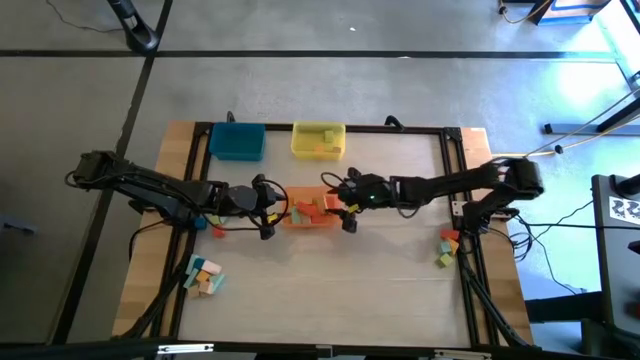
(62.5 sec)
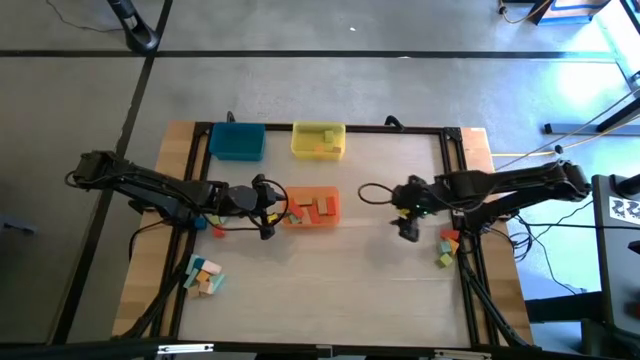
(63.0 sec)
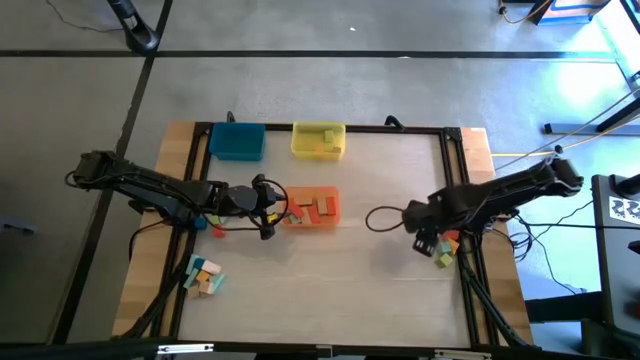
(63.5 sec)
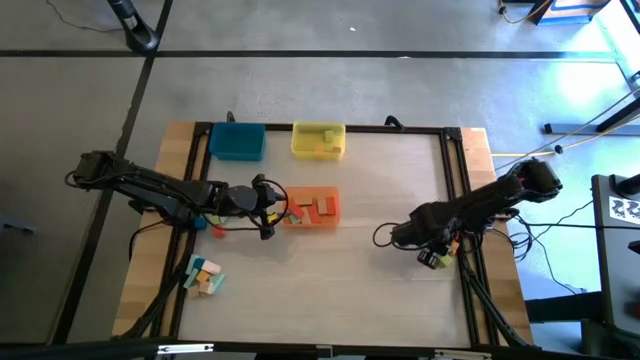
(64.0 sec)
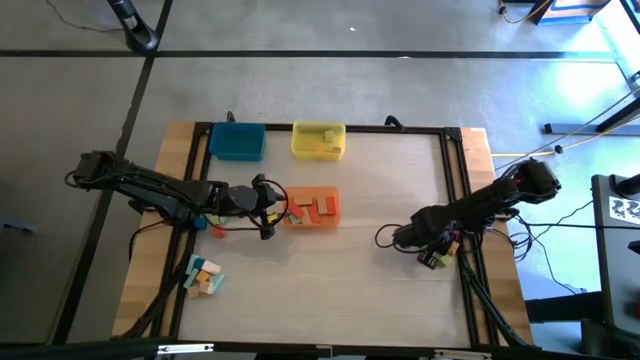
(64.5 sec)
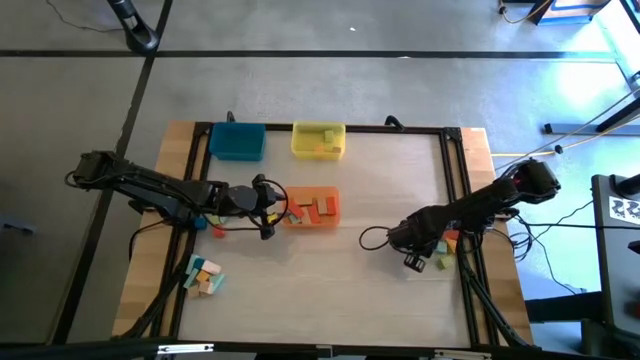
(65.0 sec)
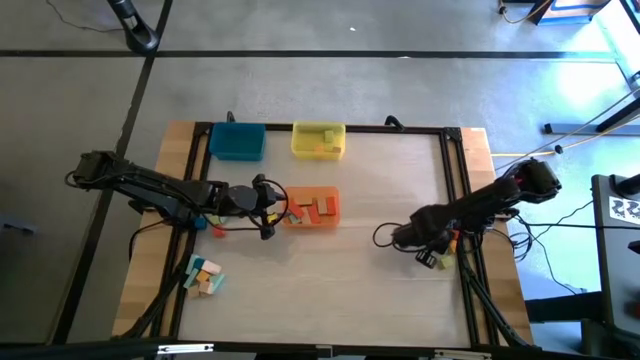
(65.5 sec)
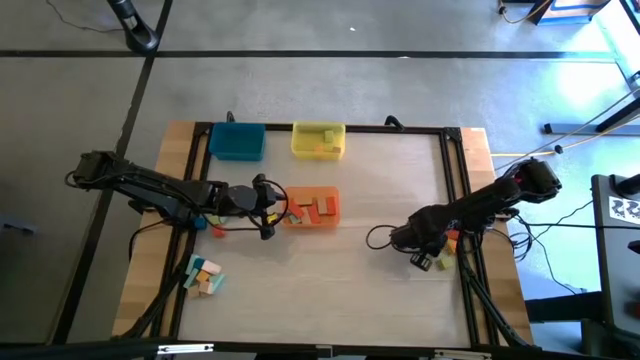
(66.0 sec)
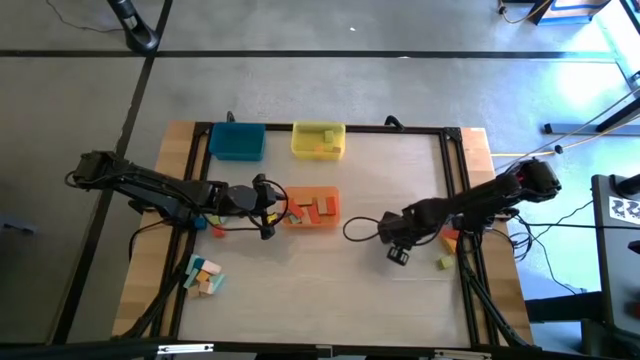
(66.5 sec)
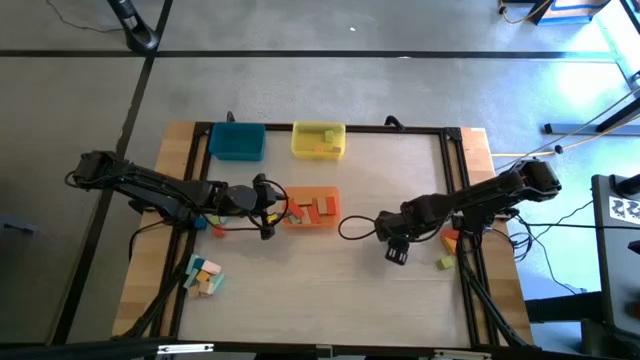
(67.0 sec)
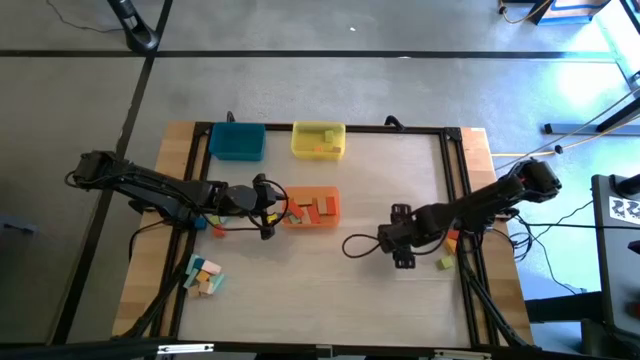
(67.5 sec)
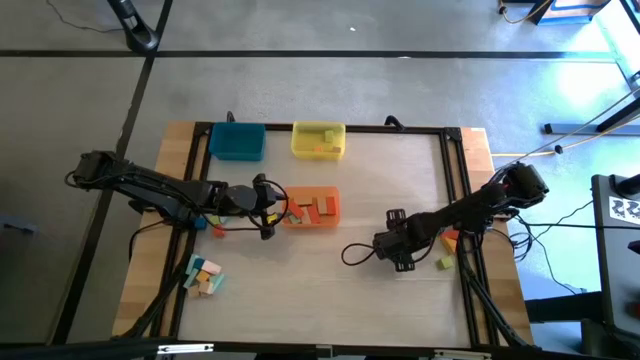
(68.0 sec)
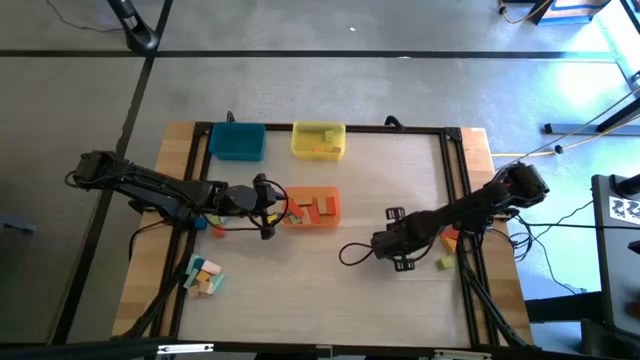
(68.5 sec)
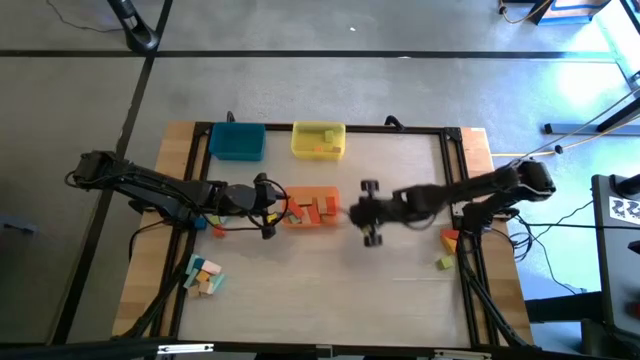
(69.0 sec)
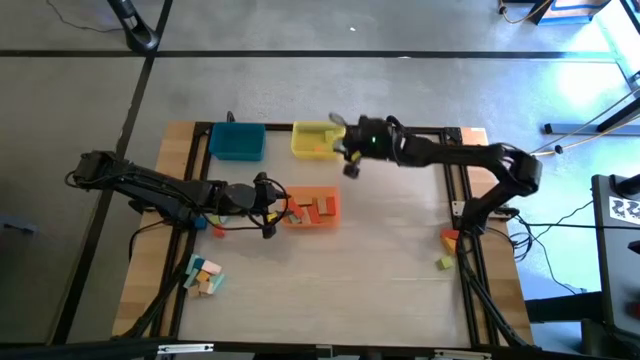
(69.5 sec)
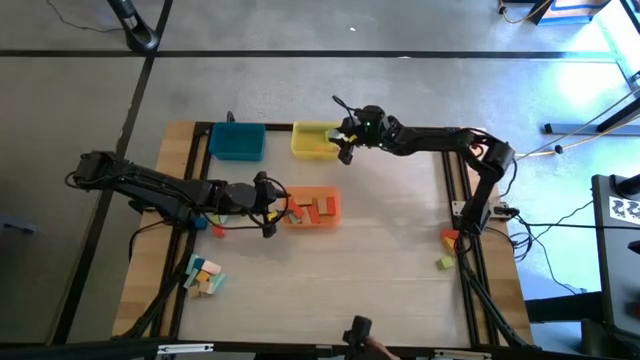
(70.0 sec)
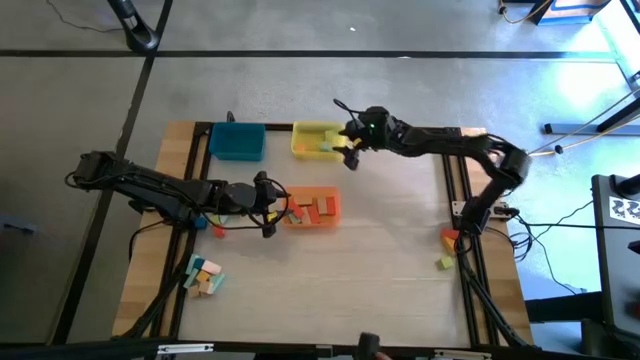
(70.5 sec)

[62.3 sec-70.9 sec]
Task: Sort blocks by size
Put the light blue square block into the yellow bin

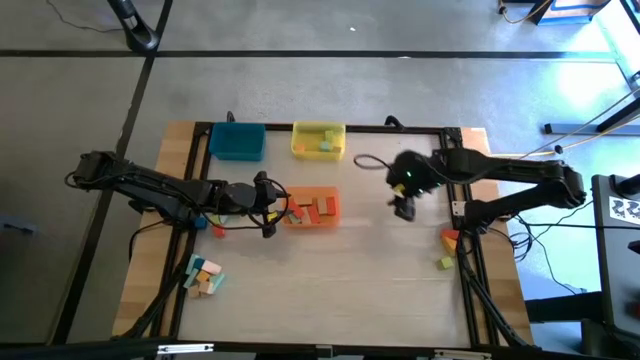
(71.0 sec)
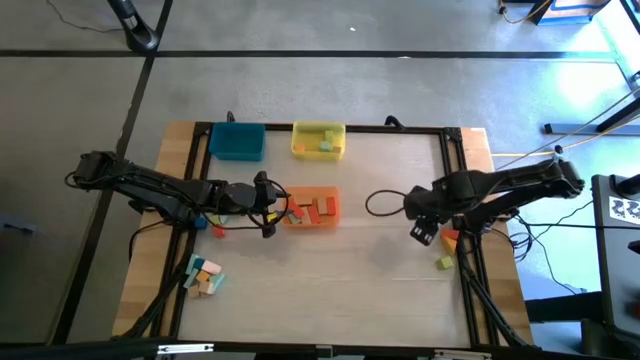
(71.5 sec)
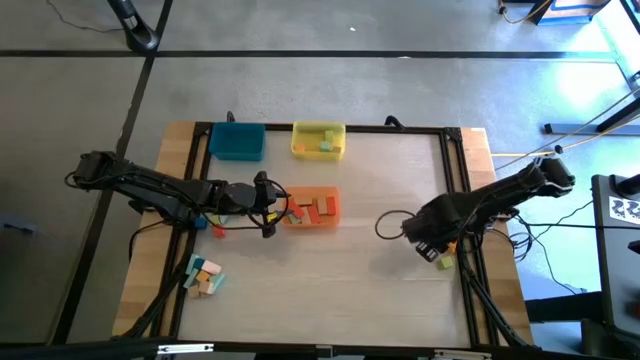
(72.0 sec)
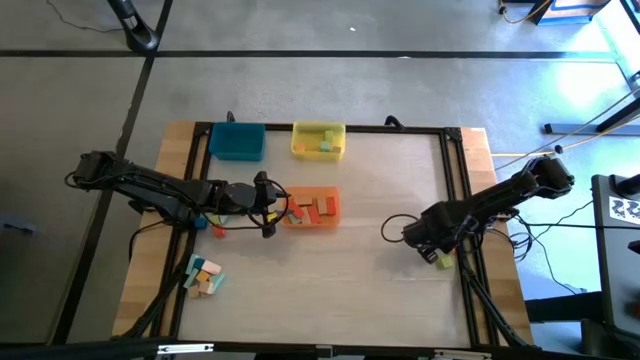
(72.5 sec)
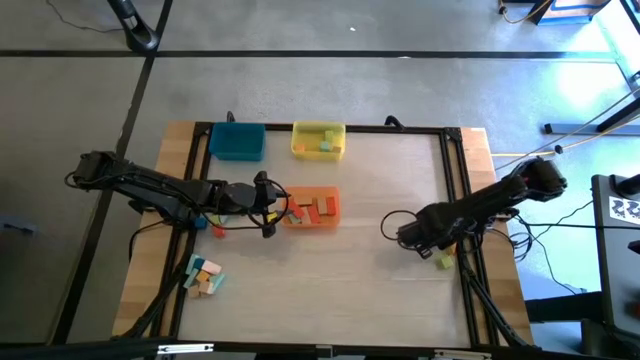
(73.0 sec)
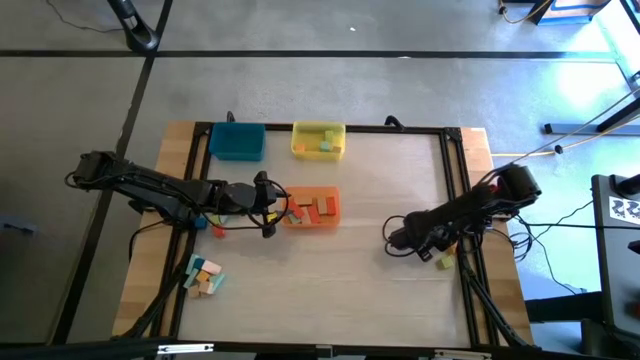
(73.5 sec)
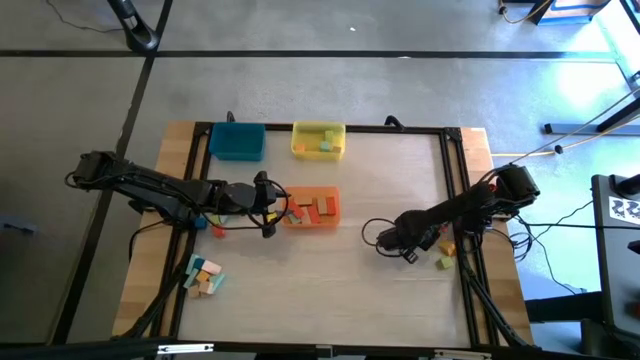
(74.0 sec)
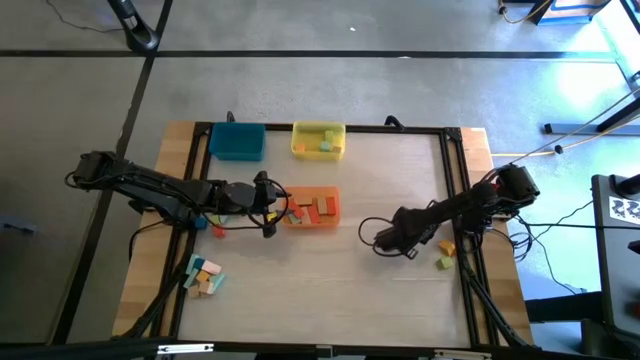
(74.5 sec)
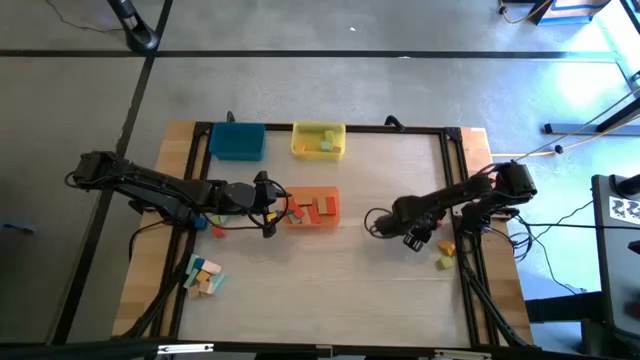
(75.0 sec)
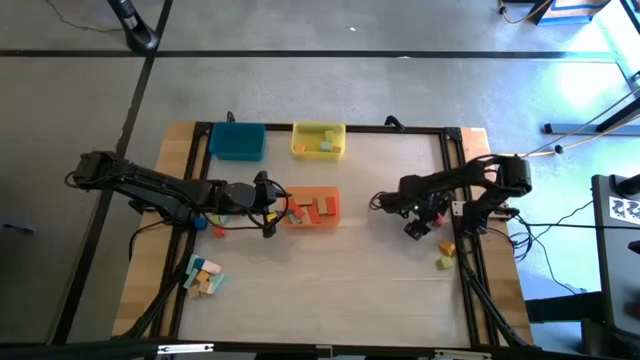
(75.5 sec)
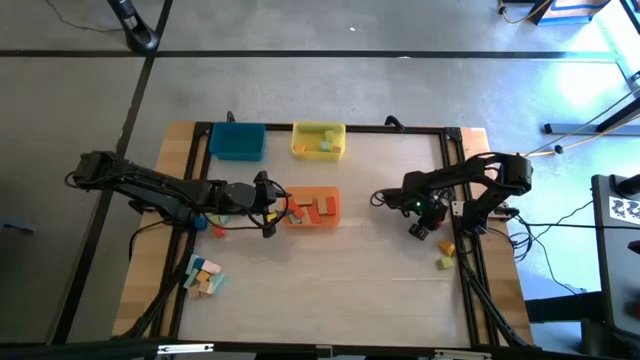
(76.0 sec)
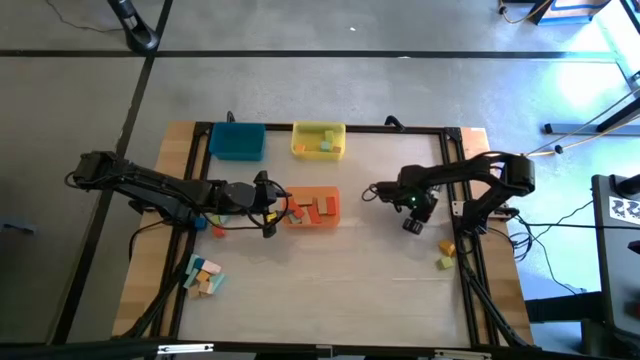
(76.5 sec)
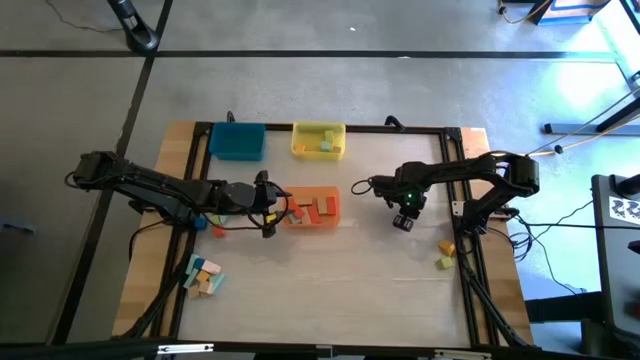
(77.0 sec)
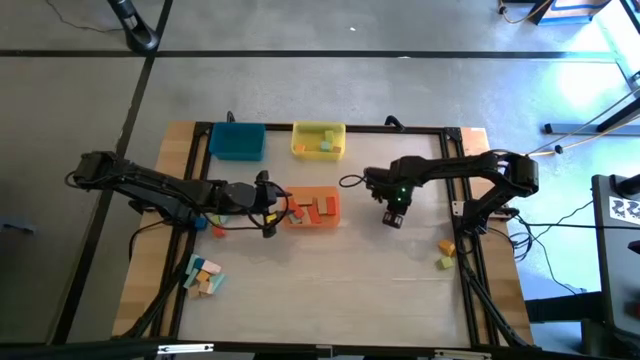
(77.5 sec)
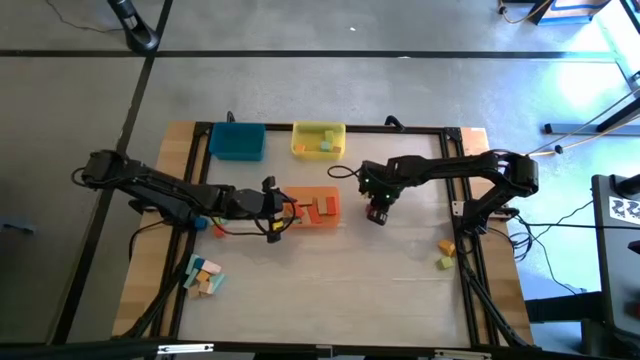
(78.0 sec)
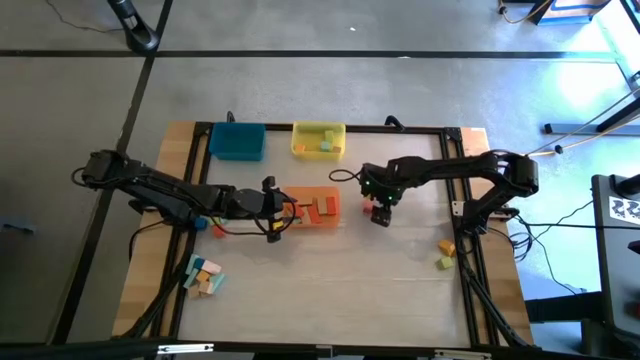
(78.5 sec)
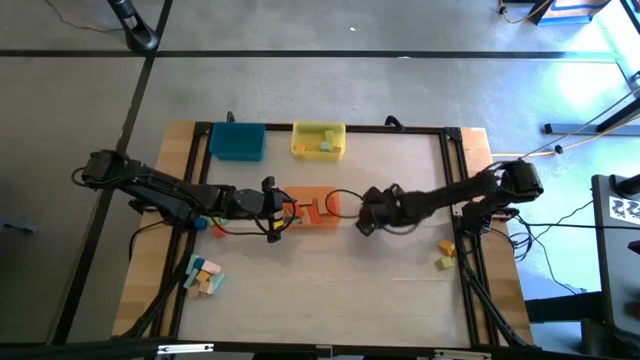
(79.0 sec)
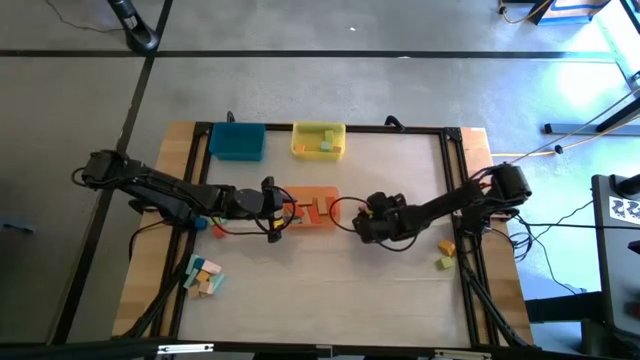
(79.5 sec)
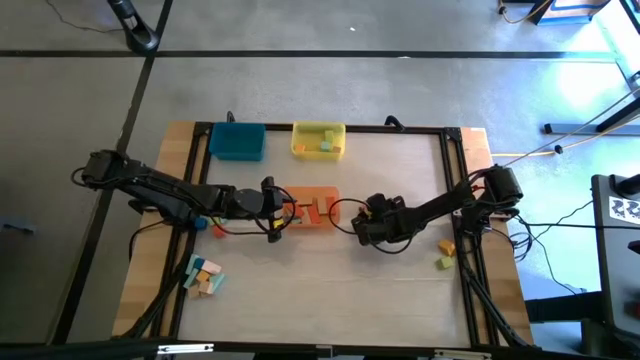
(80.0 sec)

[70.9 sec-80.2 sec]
Put the orange triangle block into the blue bin

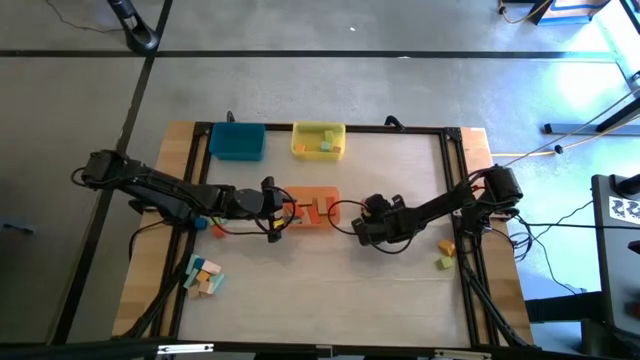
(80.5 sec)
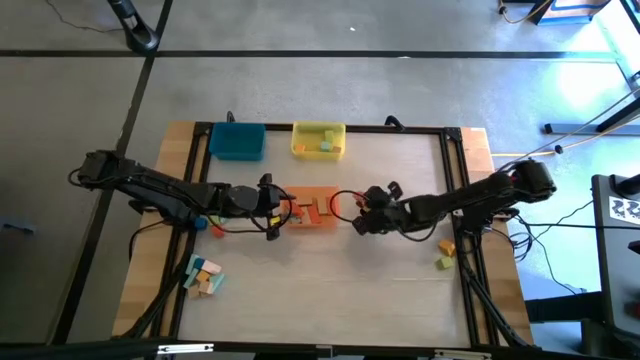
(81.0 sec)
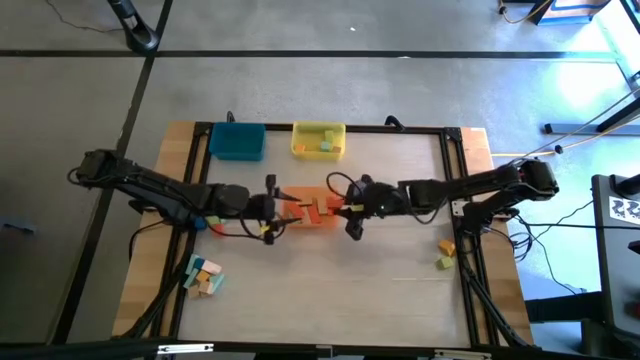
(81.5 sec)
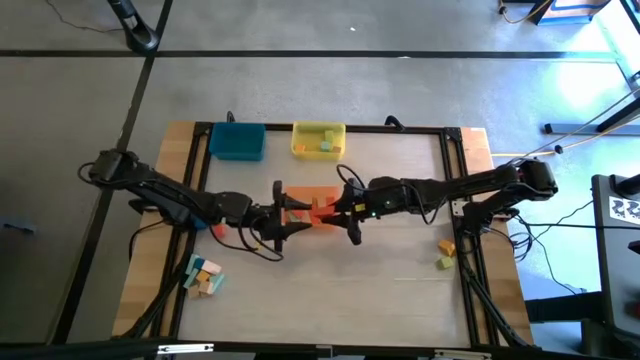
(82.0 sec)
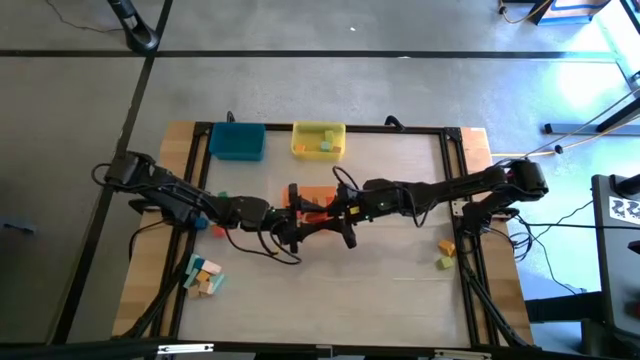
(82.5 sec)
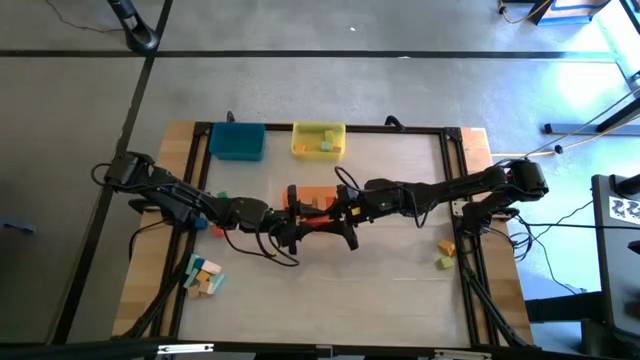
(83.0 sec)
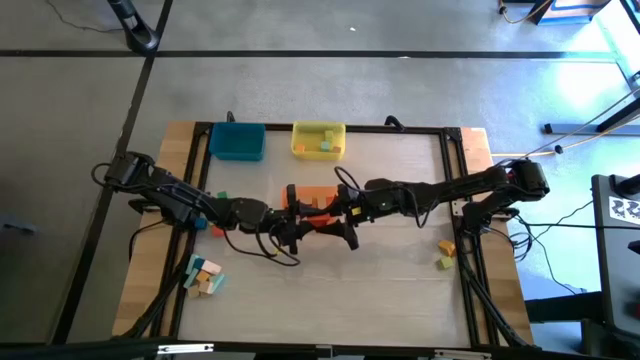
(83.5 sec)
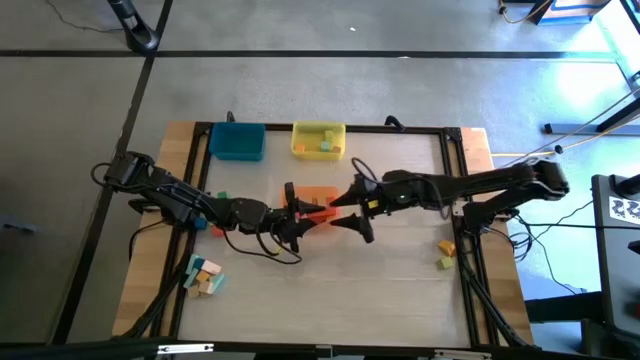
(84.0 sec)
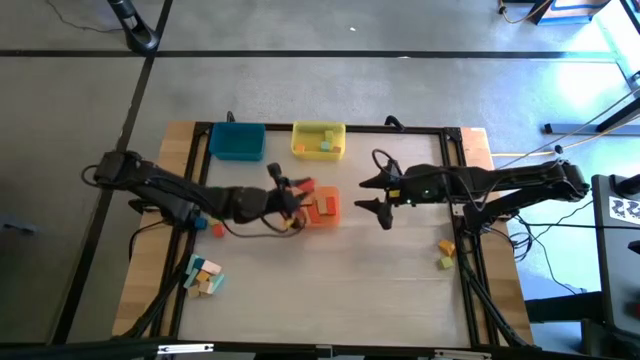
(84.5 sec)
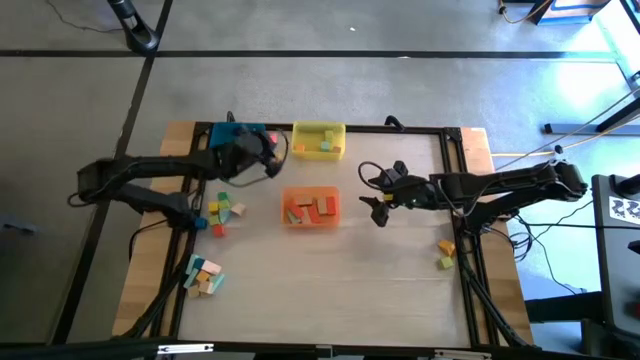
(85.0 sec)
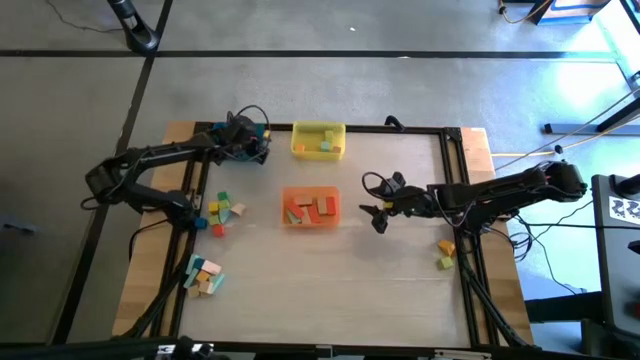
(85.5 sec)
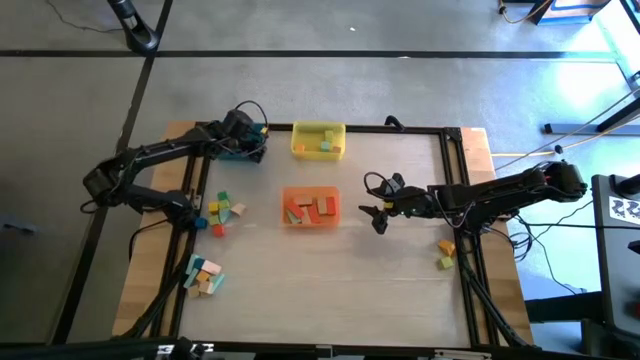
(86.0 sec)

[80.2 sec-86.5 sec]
Put the orange triangle block into the blue bin
